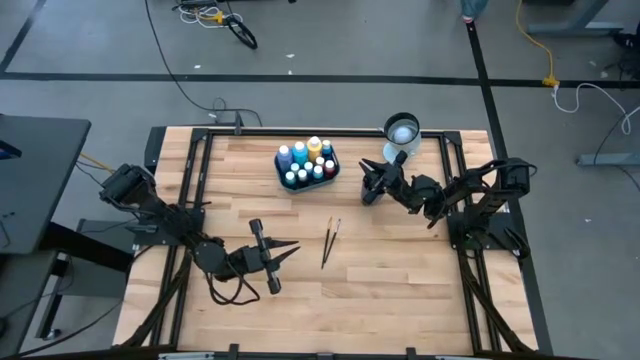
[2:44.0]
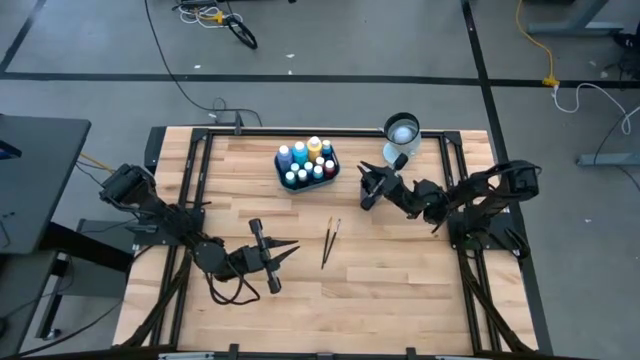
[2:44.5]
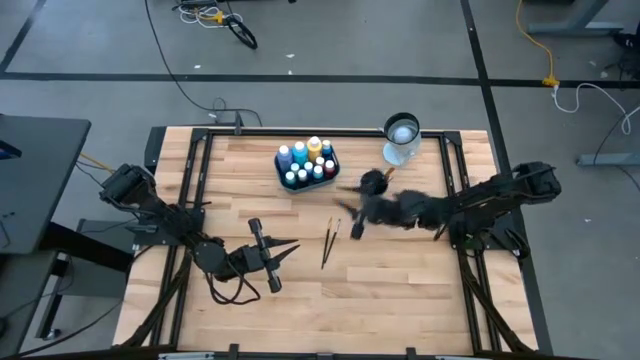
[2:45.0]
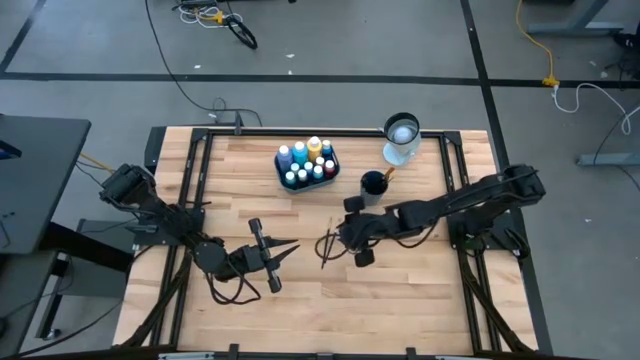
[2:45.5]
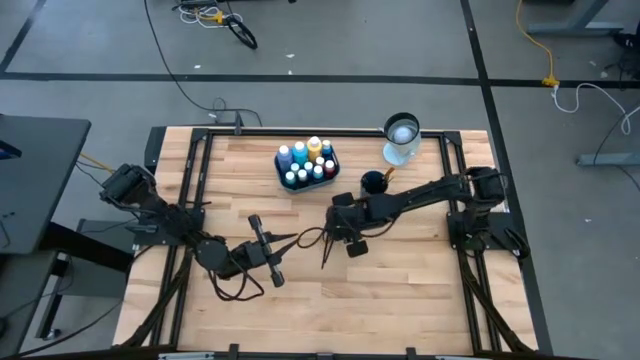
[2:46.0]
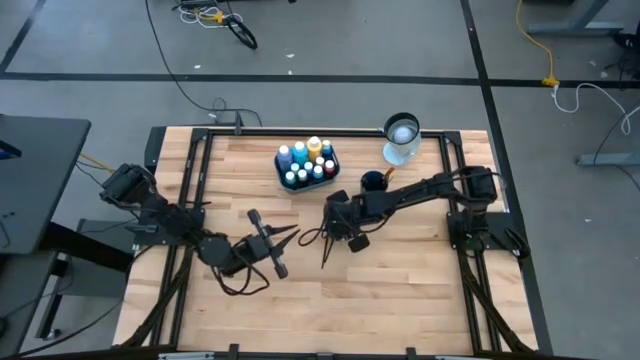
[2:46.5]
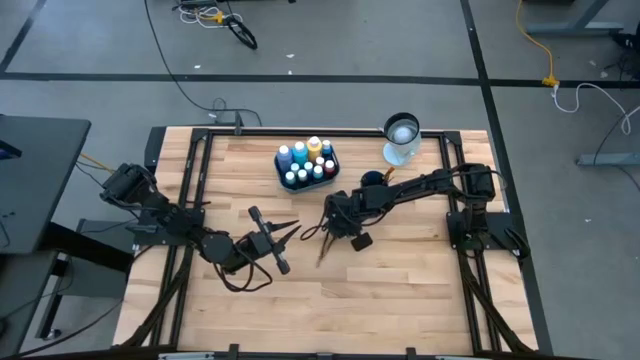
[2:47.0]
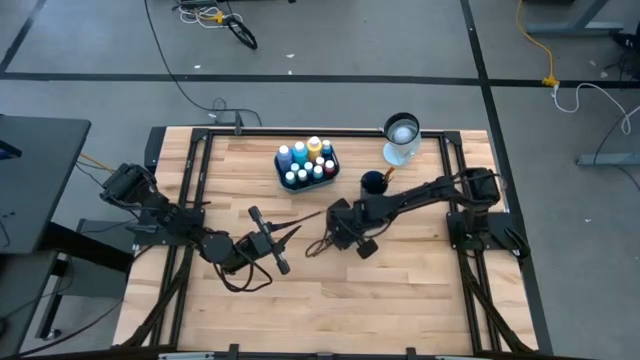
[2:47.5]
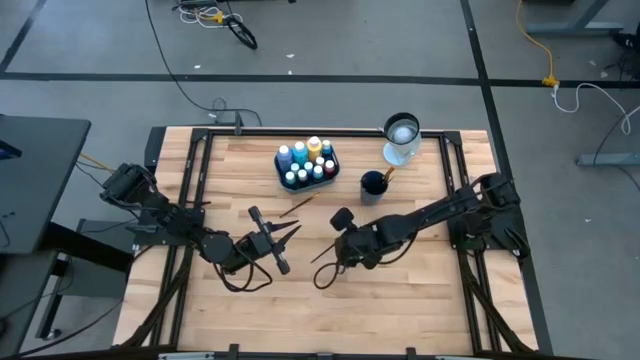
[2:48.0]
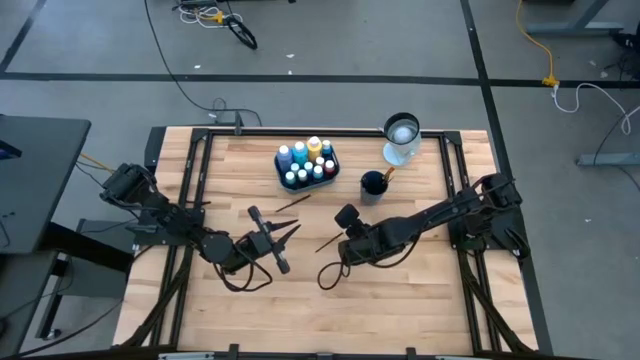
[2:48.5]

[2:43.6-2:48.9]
Task: Pick & Place Paint Supplies
Put the silver paint brush into the blue cup

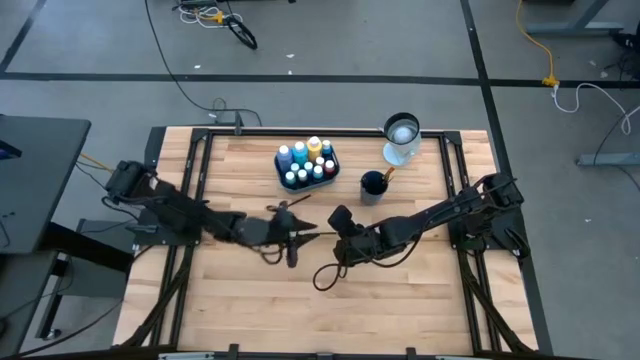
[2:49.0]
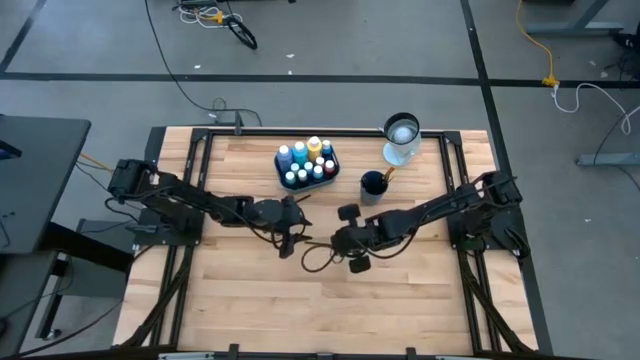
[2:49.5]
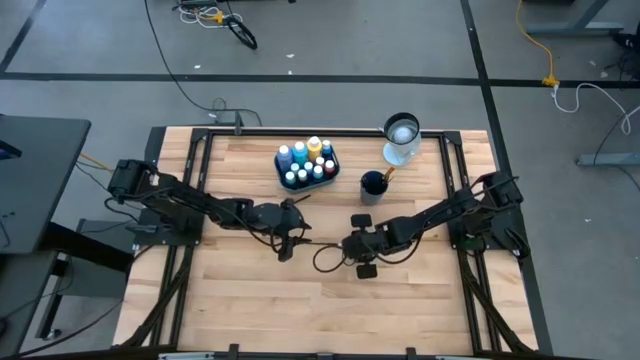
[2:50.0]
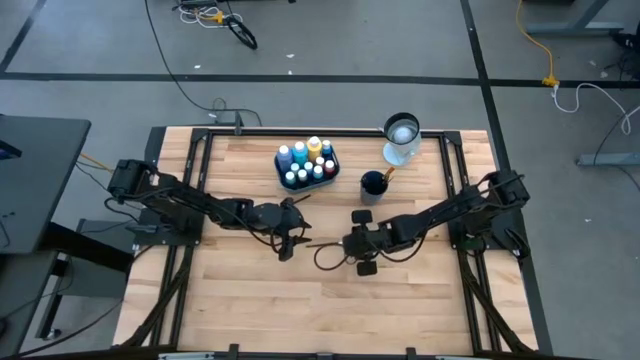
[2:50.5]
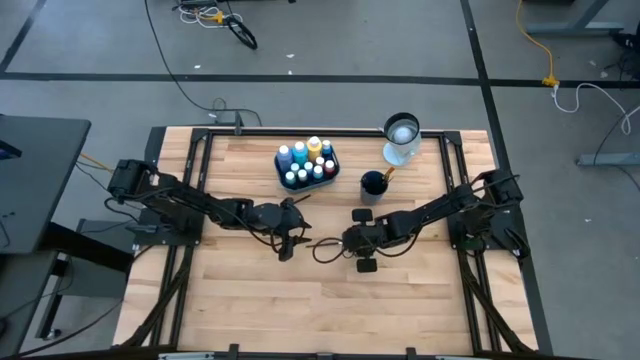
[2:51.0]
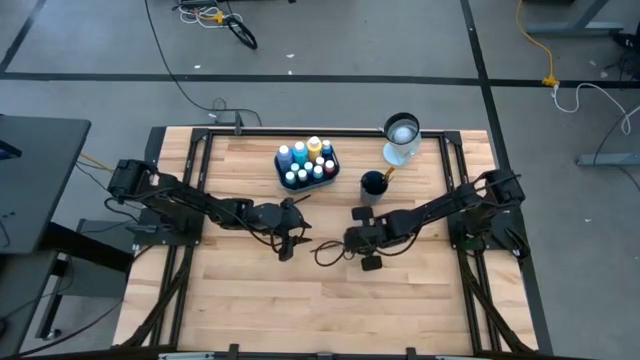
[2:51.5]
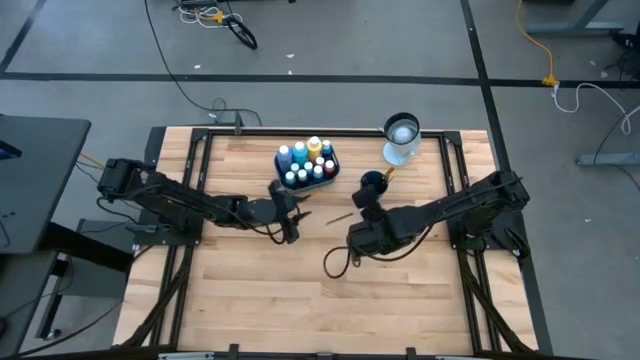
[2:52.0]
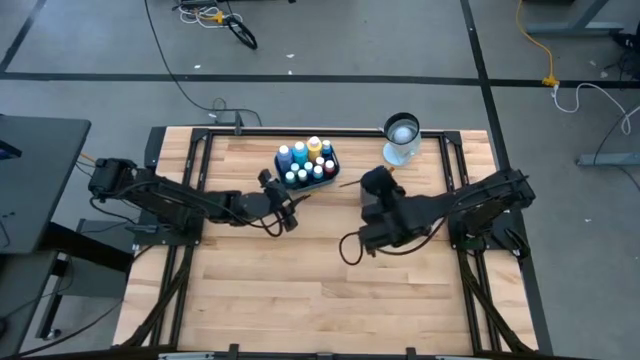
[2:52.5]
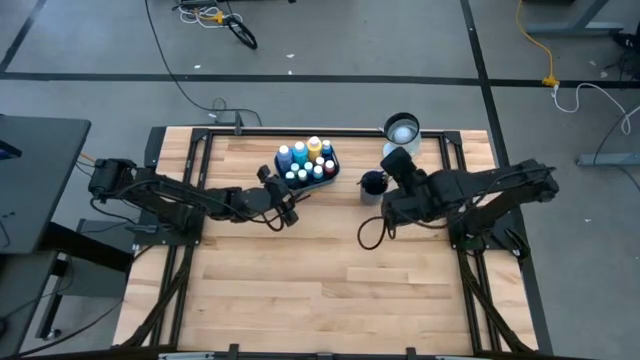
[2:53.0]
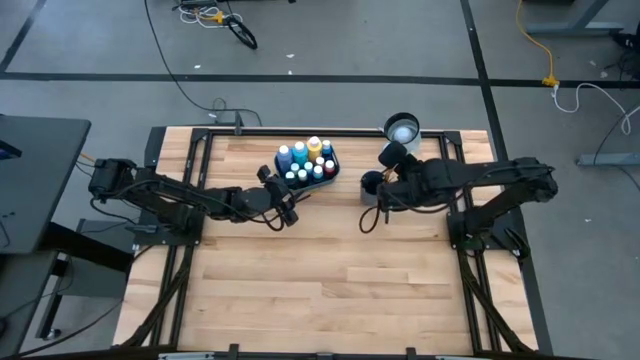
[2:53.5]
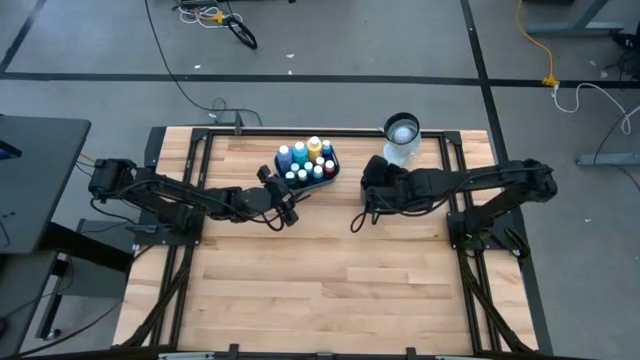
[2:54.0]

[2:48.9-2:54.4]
Put the silver paint brush into the blue cup

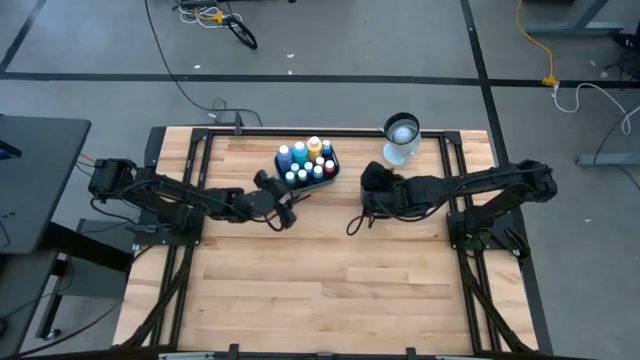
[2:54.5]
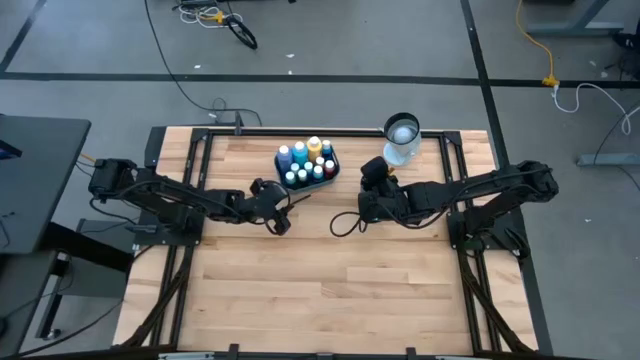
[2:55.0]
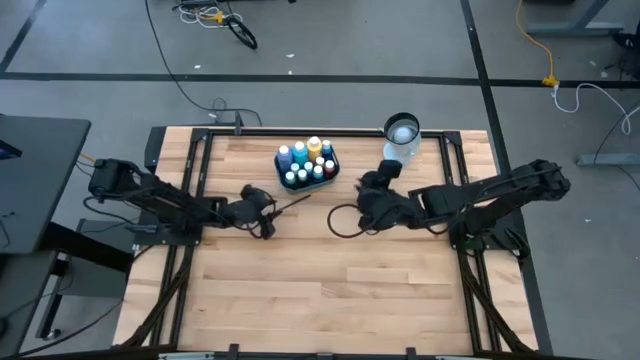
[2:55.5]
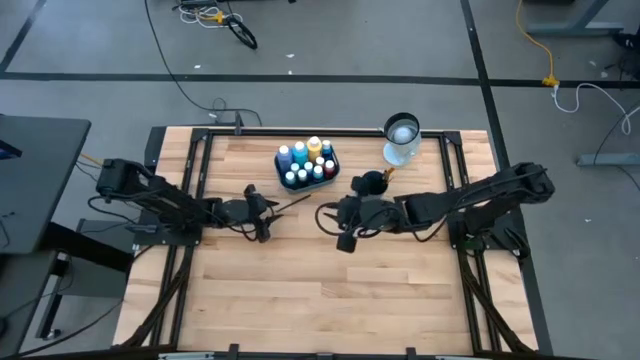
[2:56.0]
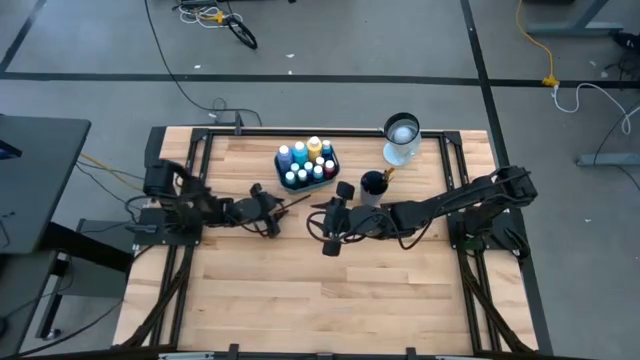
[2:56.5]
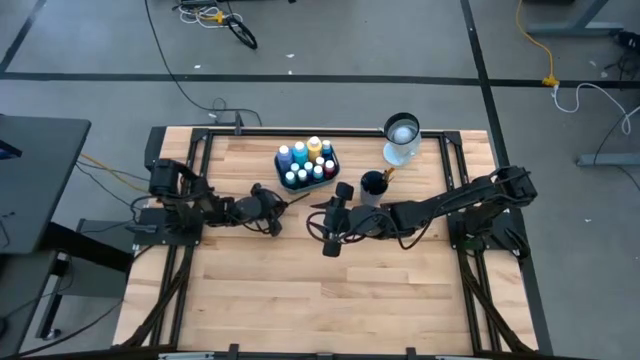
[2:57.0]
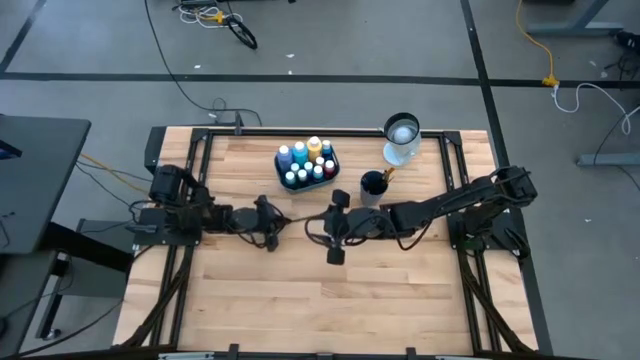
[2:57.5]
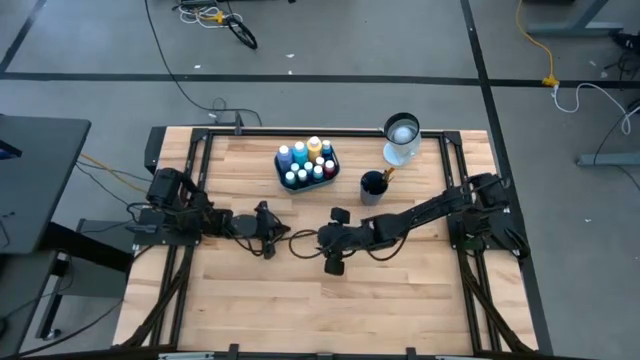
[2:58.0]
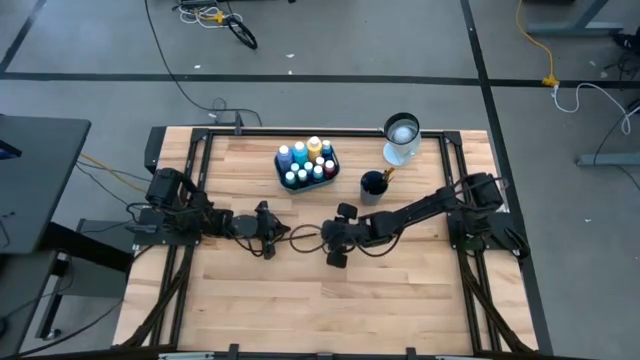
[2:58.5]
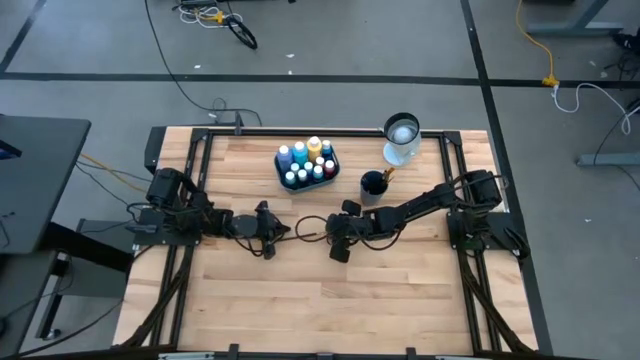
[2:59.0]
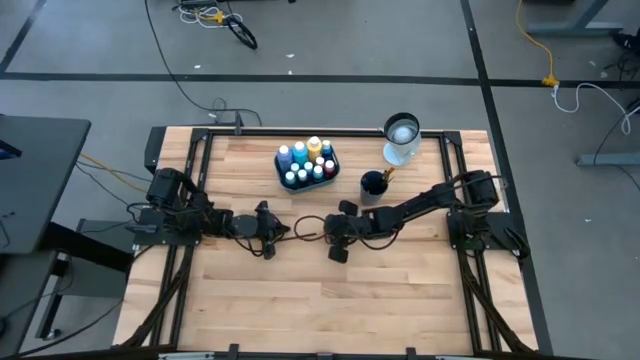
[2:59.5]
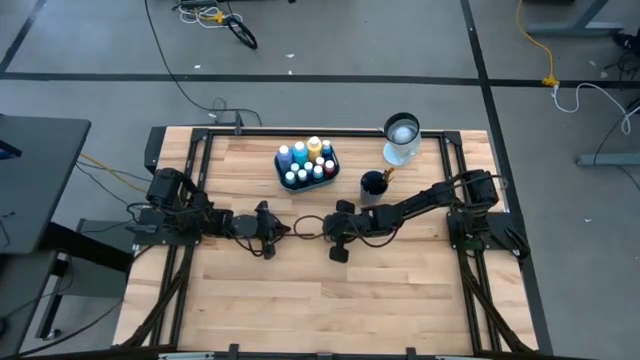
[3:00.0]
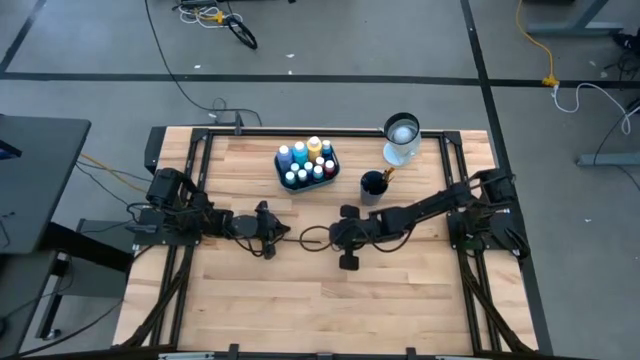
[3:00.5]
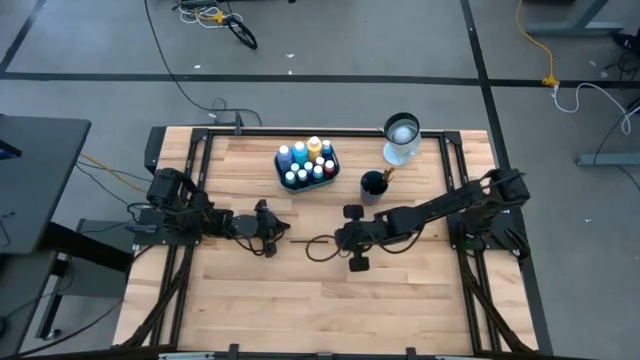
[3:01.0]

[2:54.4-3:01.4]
Put the gold paint brush into the blue cup

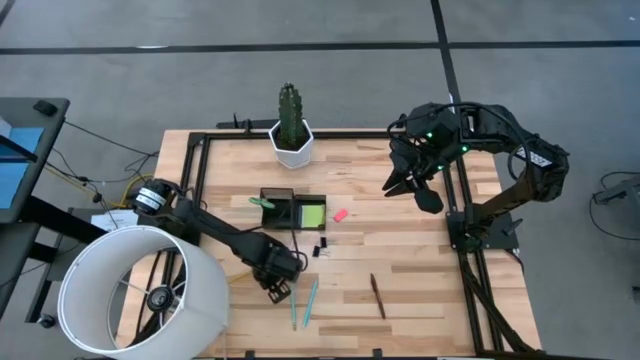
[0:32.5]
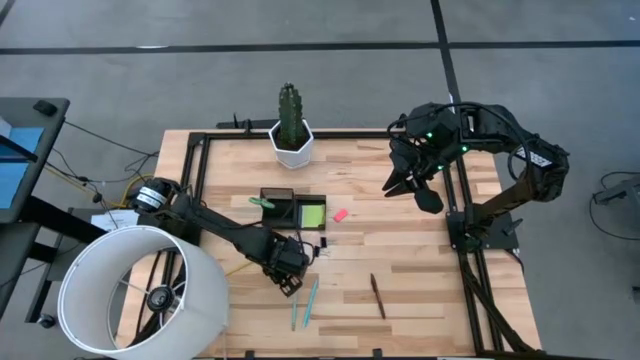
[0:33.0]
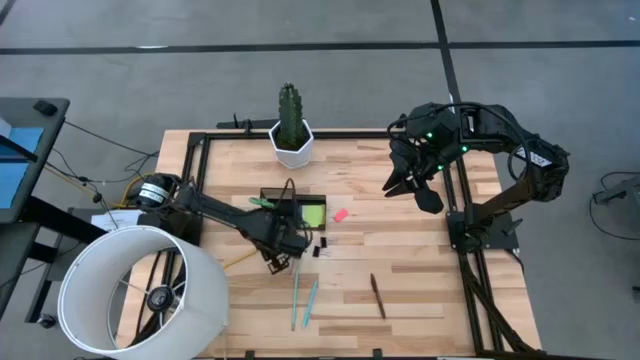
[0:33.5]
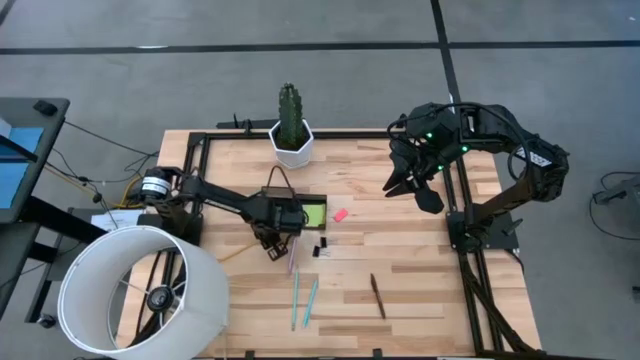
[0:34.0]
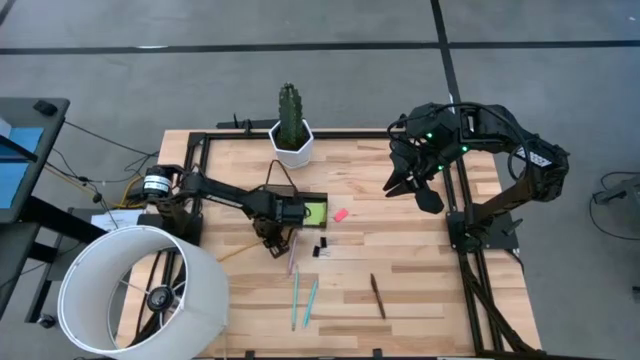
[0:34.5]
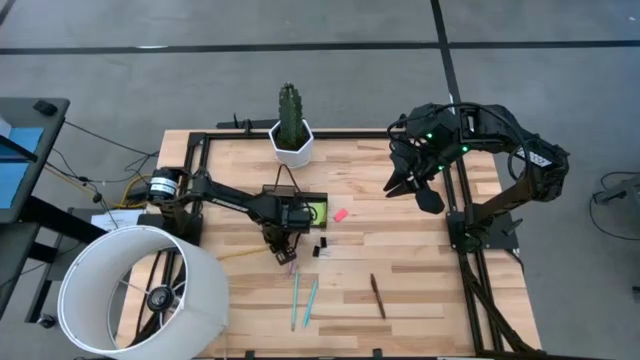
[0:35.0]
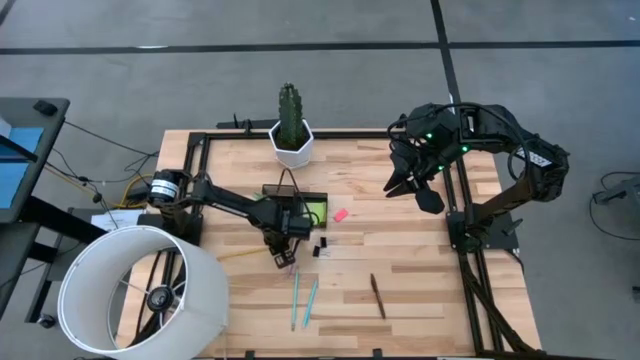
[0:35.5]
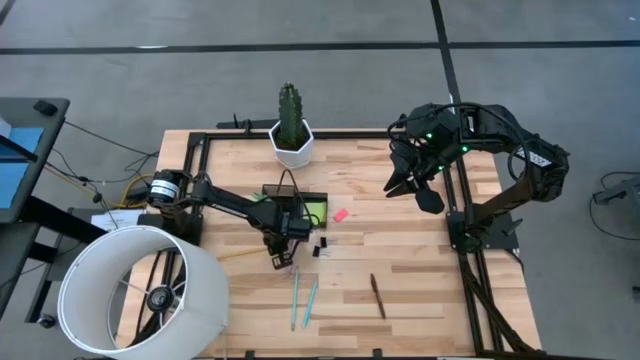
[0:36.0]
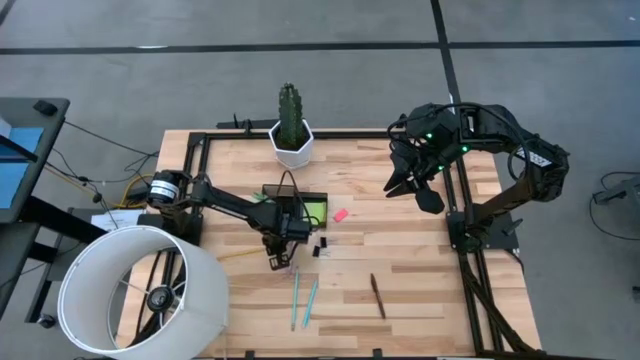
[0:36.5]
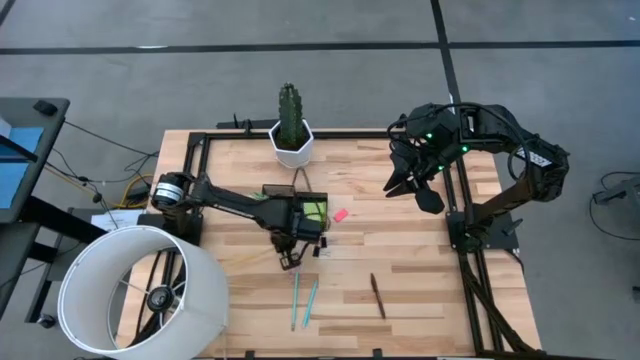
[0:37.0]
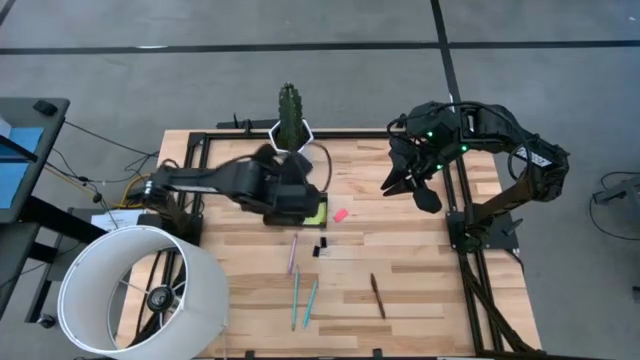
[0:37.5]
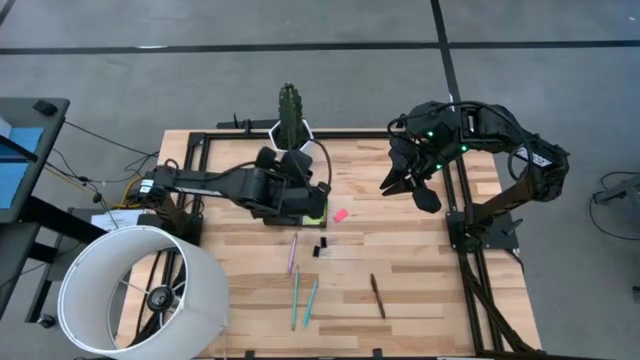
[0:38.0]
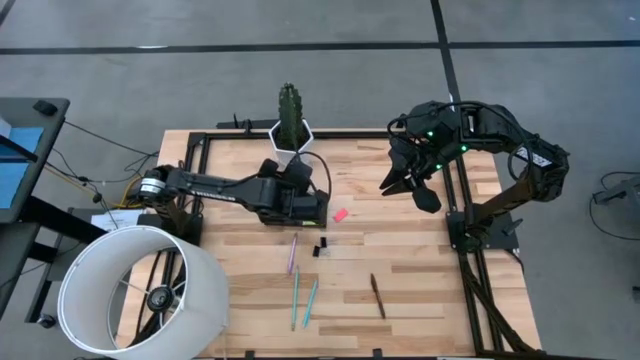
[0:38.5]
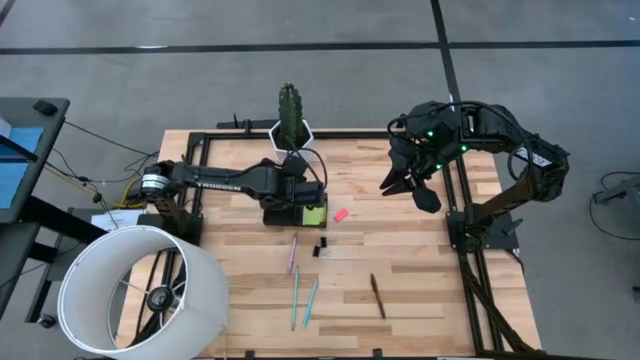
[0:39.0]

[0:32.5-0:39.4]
Task: Pick and place office supplies into organizer
Put the orange pencil into the black mesh organizer
